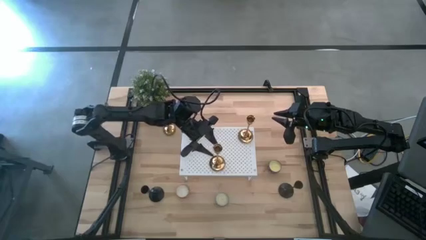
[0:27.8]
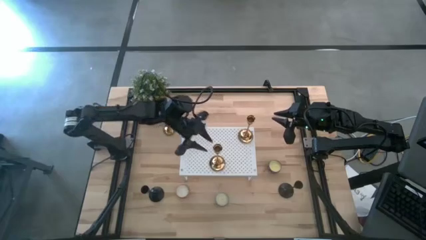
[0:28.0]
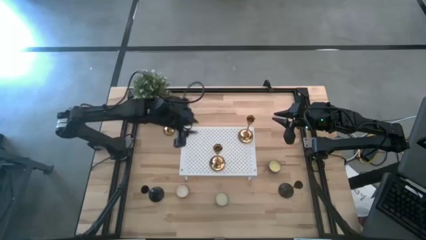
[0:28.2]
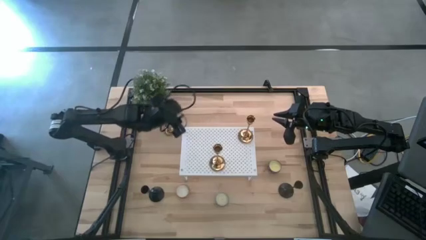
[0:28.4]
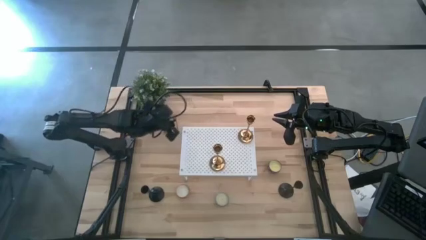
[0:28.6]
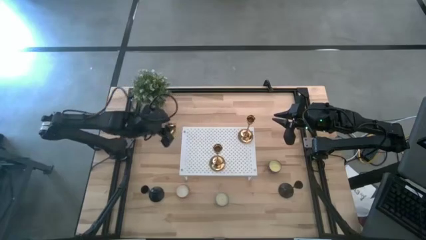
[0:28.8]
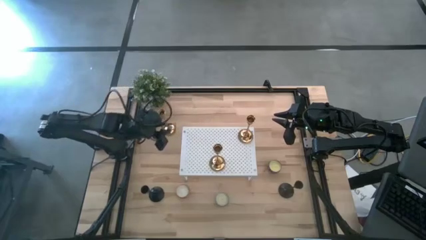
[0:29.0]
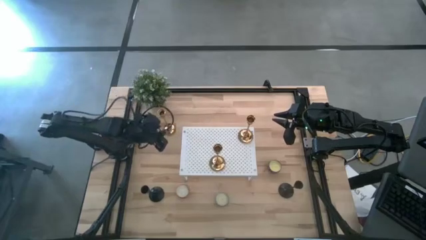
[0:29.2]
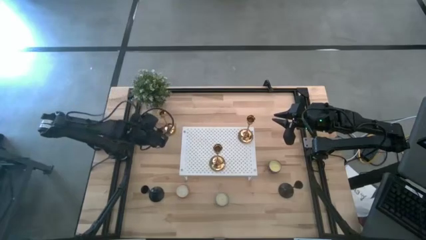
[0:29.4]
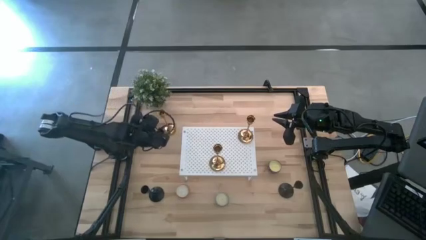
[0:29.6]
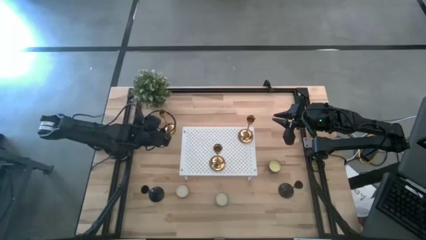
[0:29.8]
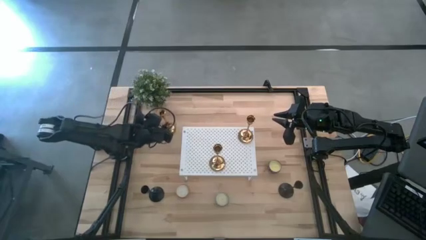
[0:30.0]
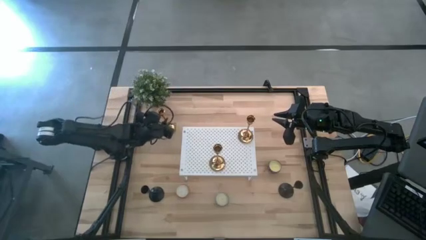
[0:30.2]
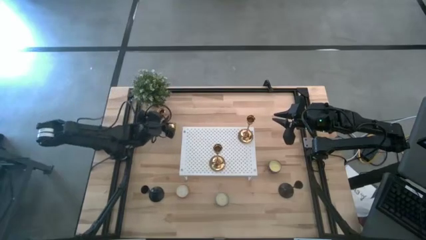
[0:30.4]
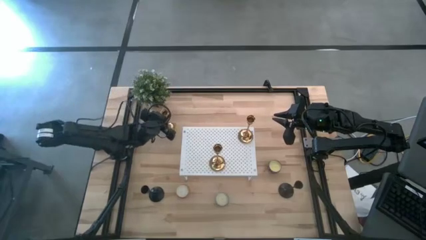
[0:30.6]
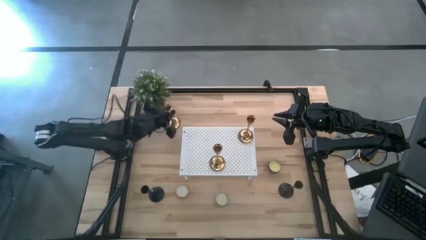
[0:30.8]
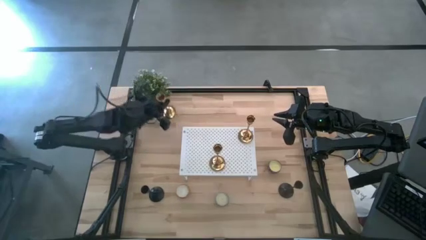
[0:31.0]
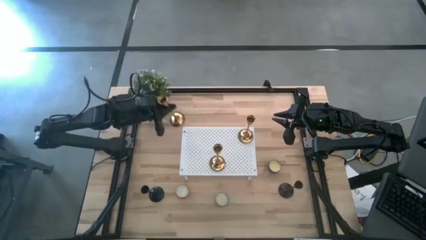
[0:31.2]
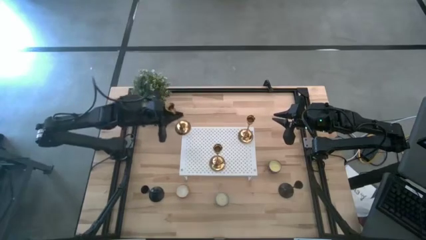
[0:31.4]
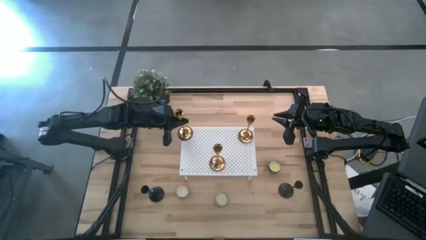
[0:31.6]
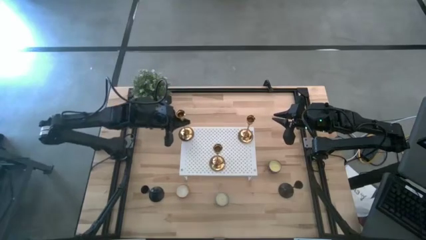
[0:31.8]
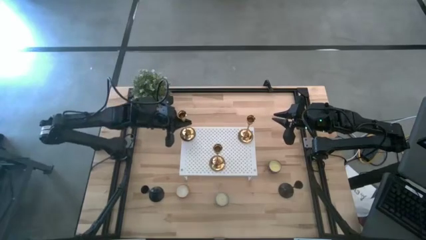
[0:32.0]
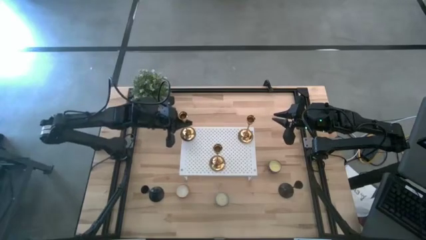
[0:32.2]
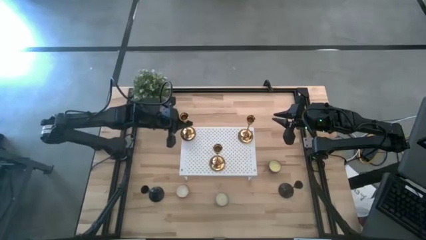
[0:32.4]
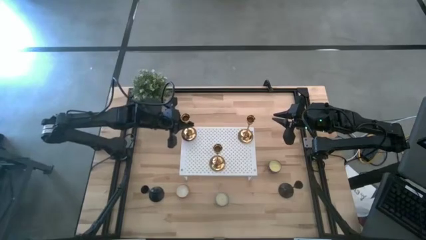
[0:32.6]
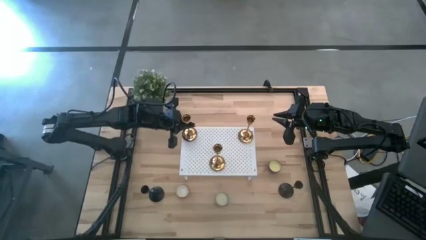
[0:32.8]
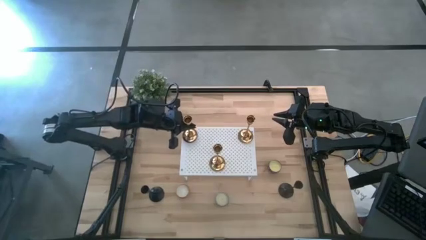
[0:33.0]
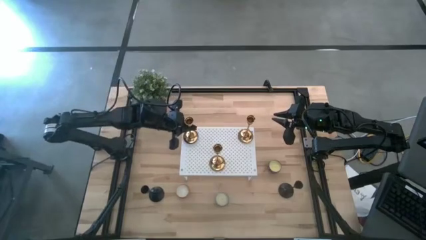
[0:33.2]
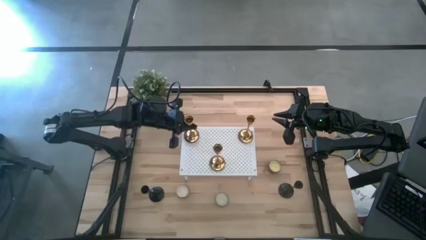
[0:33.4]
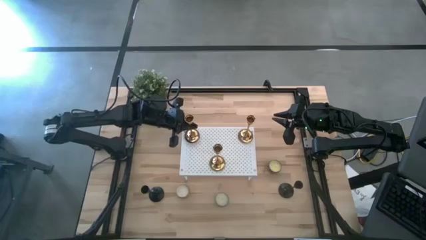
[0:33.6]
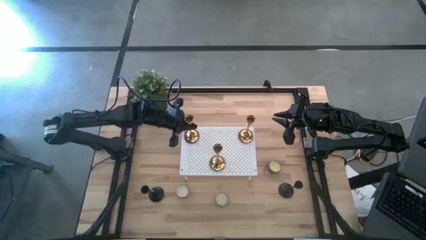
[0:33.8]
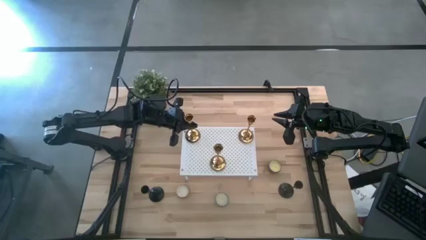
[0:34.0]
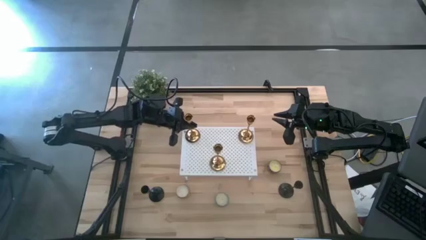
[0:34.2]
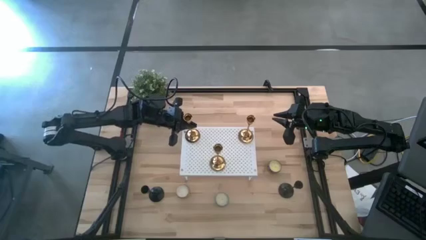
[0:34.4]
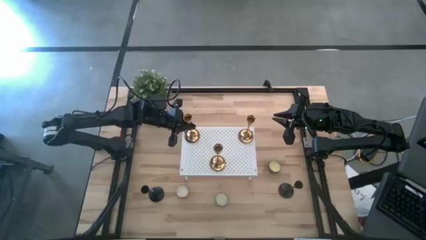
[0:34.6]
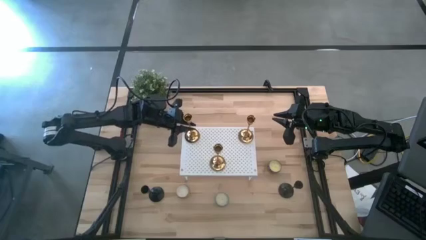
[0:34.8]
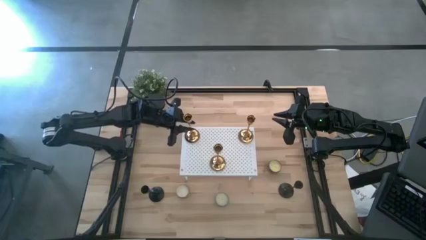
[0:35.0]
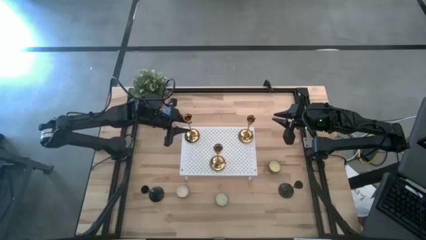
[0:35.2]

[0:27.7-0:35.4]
Task: Pick & Place candle stick holders
Put the golden candle holder on the shelf

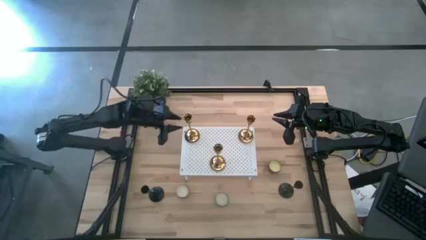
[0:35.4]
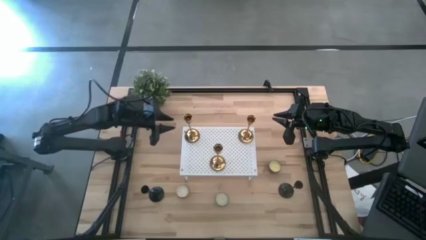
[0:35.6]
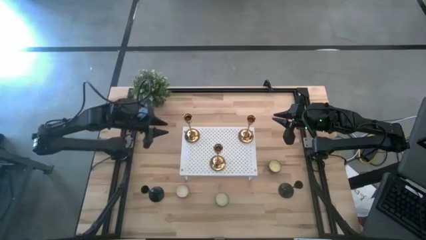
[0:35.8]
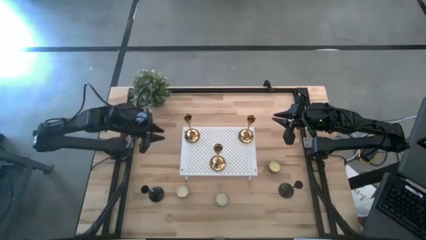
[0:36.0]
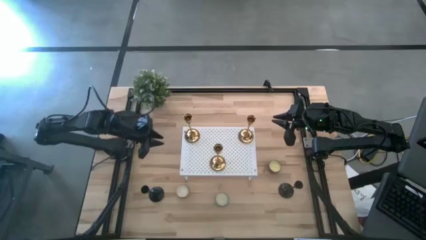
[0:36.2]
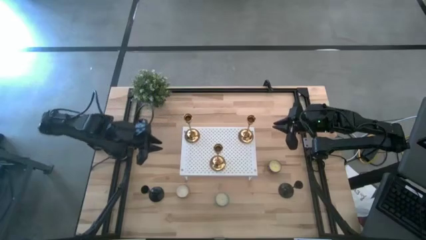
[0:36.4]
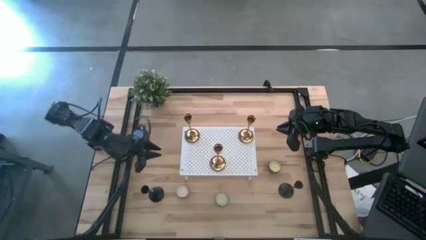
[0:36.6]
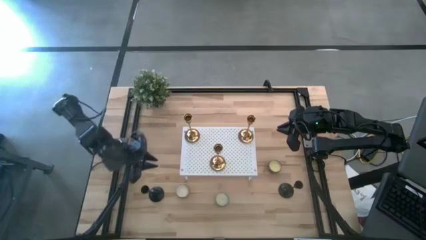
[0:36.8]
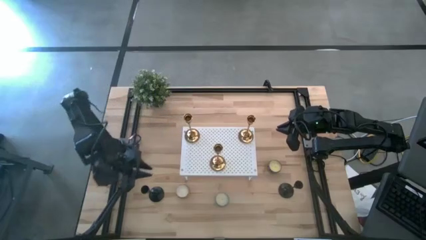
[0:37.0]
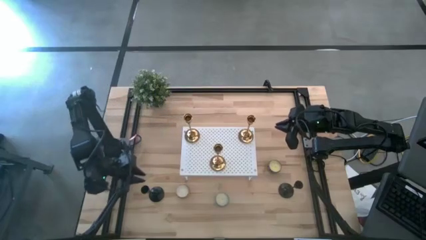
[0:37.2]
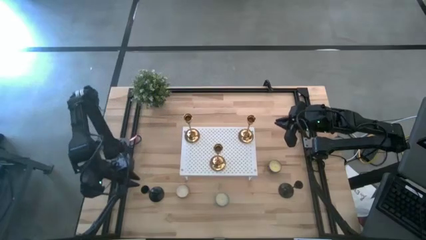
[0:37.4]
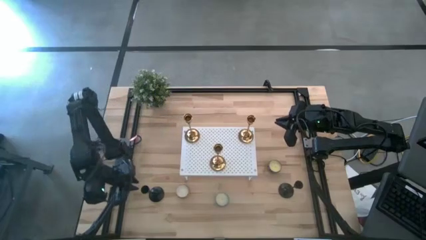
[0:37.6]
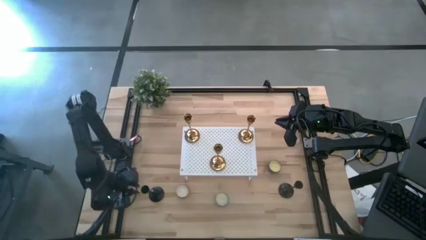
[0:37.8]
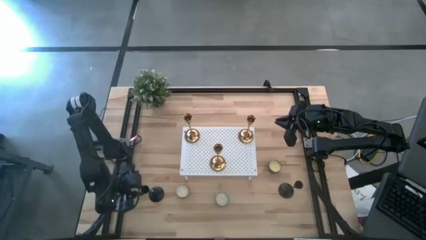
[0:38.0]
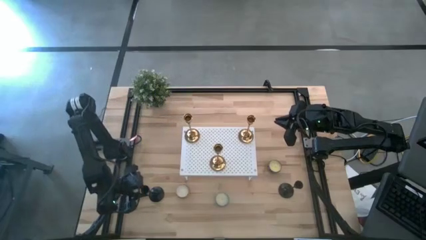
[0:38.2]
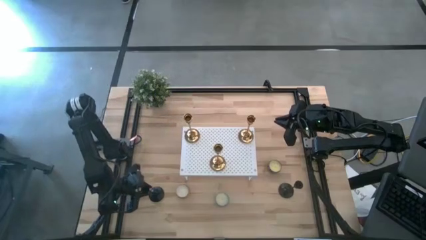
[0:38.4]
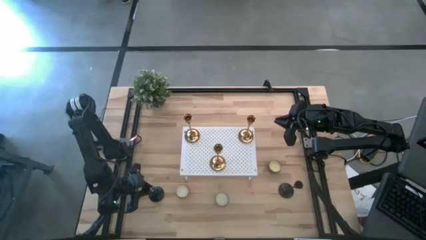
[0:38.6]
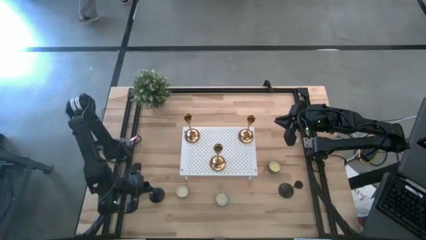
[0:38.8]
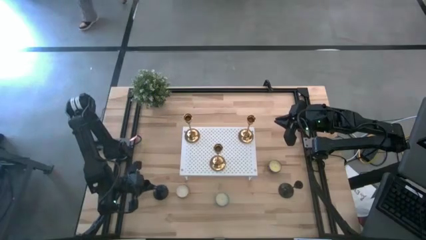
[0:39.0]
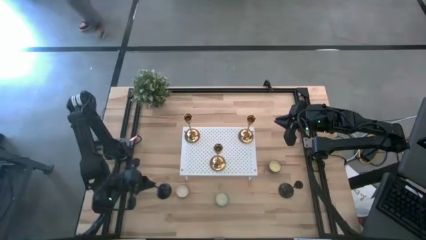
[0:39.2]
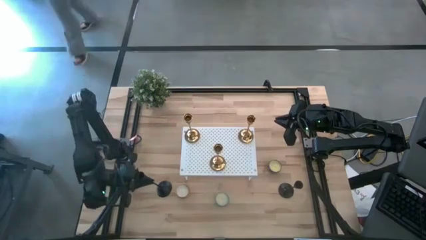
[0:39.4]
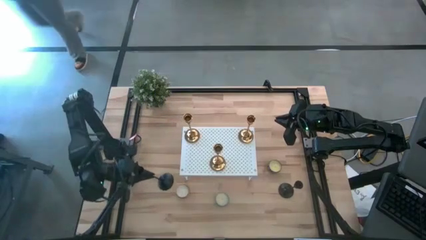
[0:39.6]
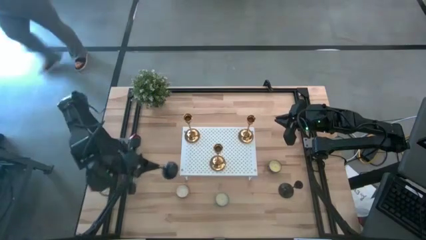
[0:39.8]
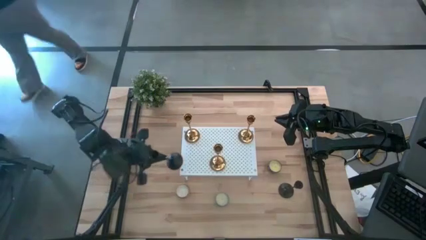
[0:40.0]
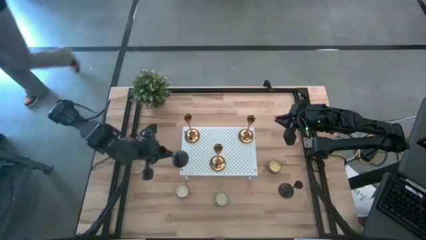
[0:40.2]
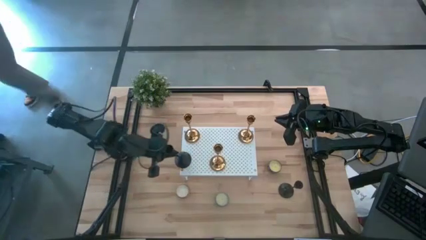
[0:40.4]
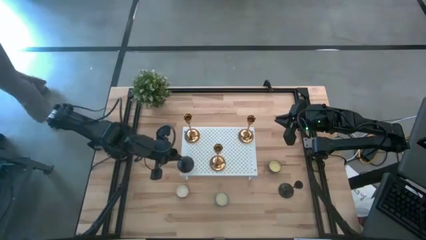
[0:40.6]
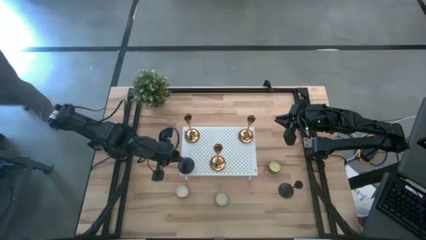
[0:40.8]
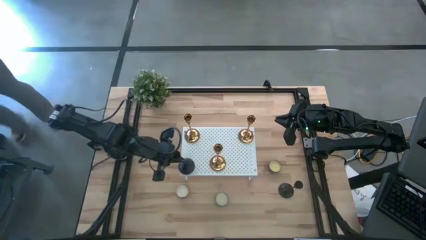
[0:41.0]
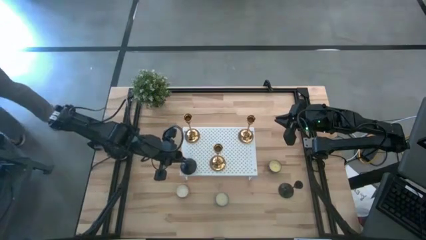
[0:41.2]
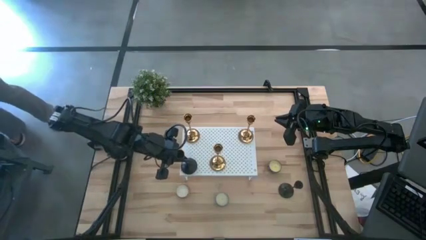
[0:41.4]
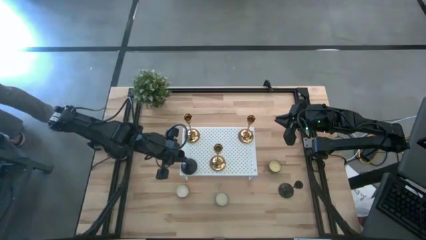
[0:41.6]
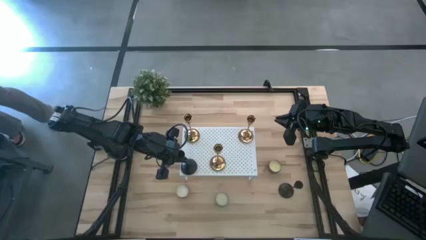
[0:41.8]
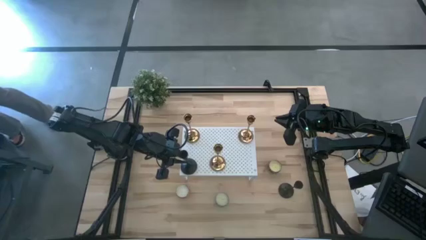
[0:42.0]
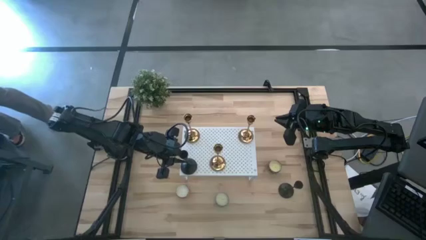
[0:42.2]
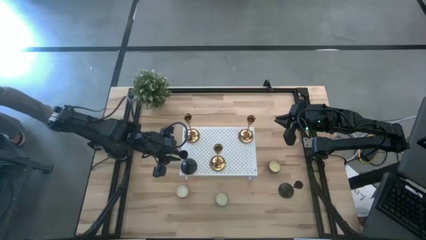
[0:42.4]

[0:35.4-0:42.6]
Put the left black candle holder on the shelf
